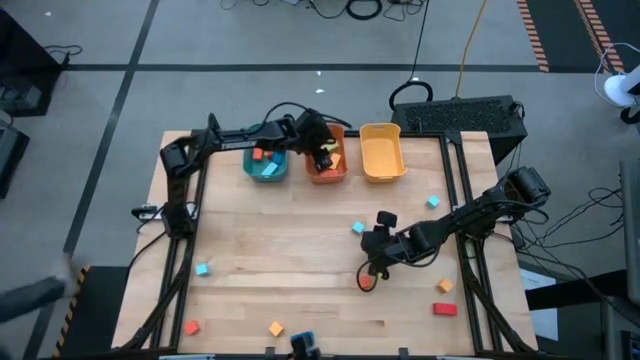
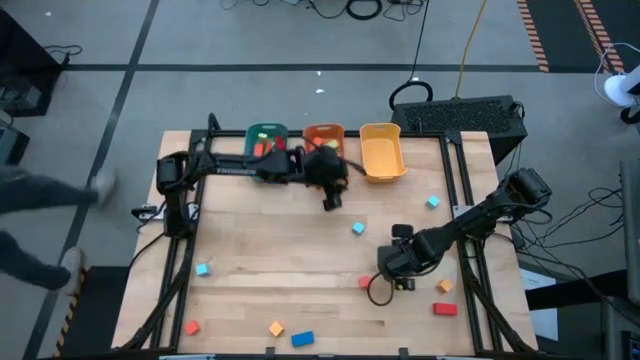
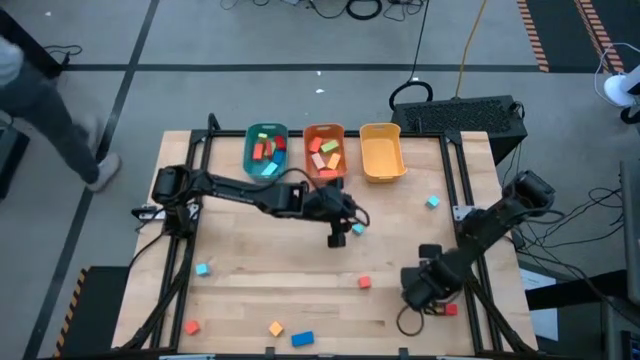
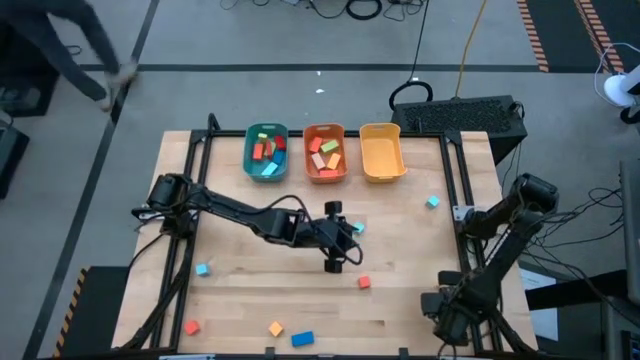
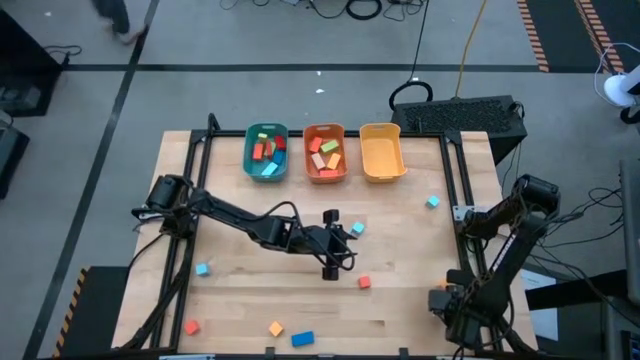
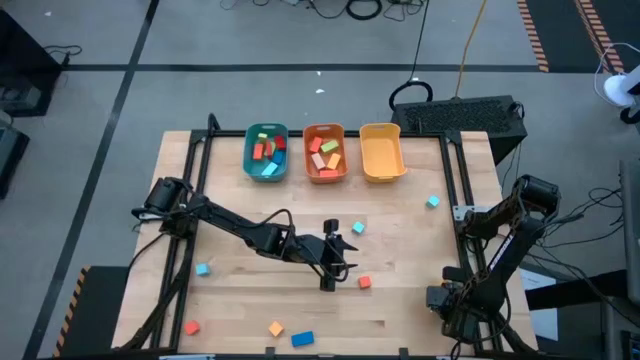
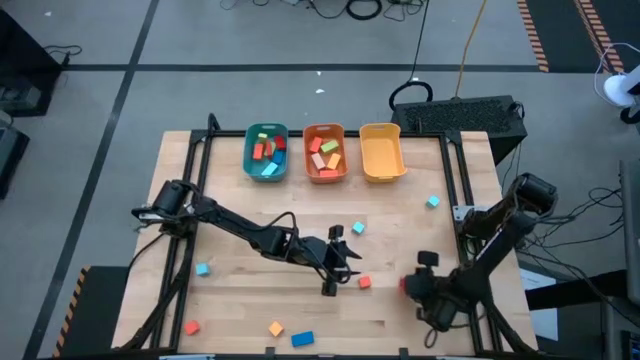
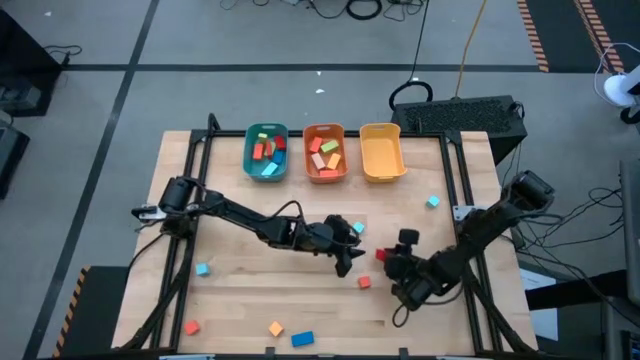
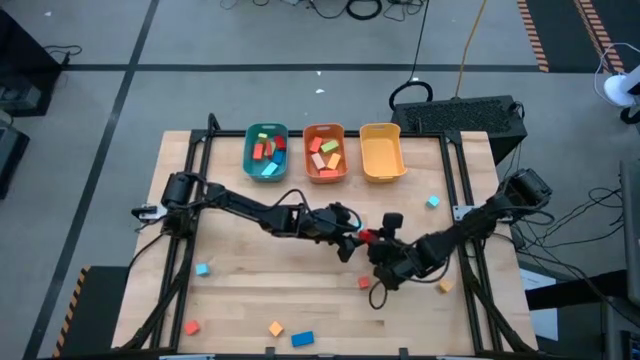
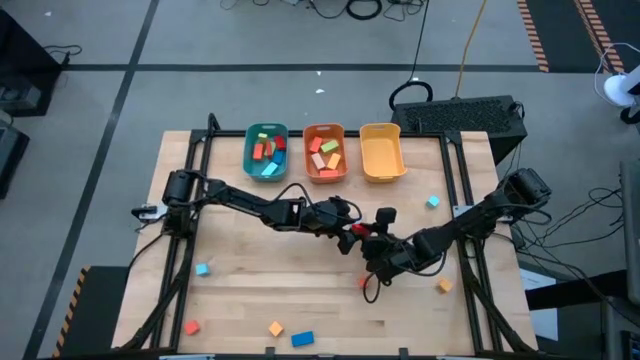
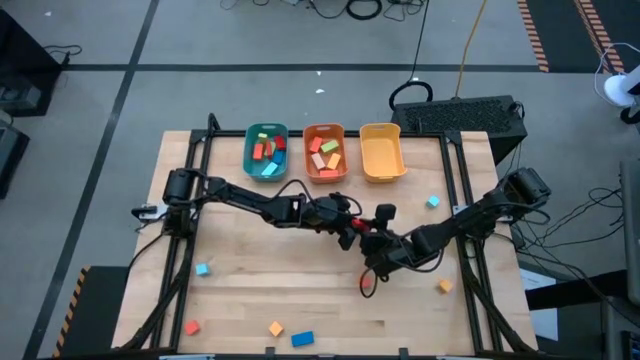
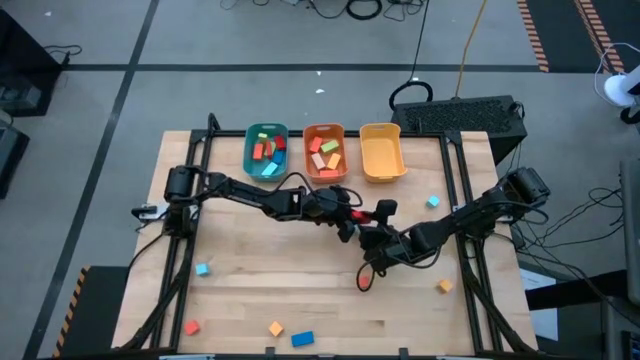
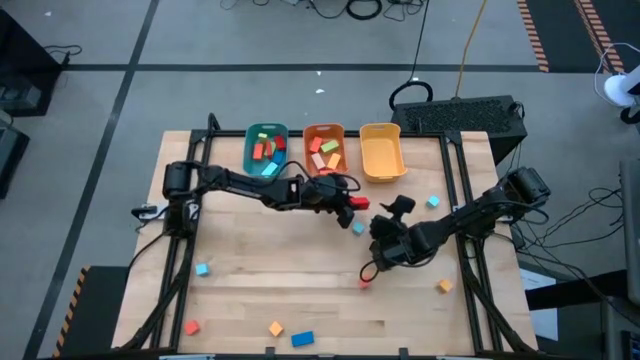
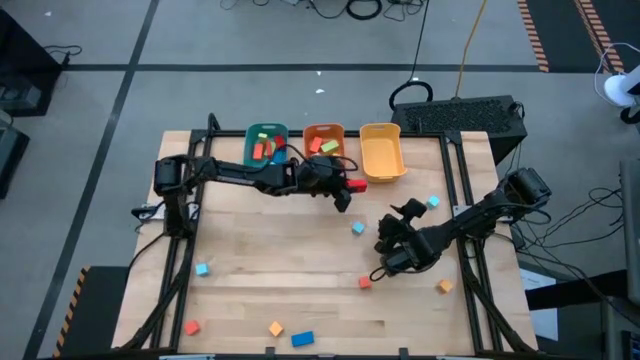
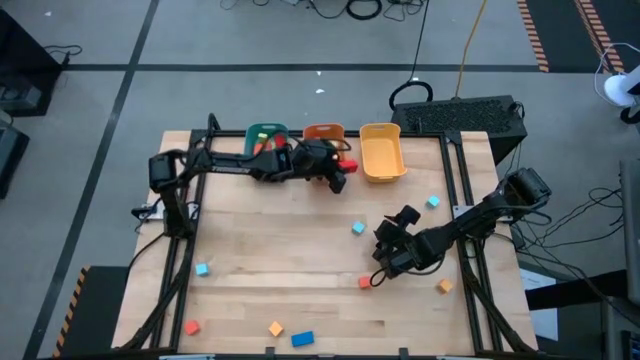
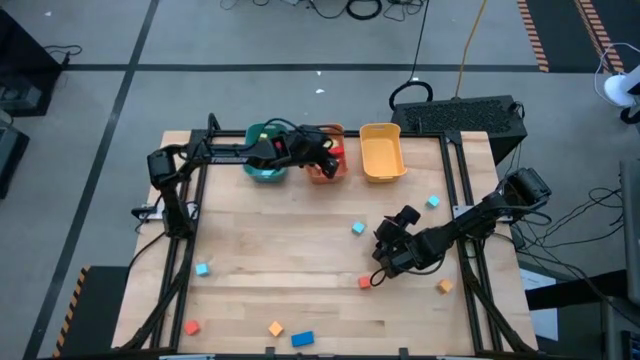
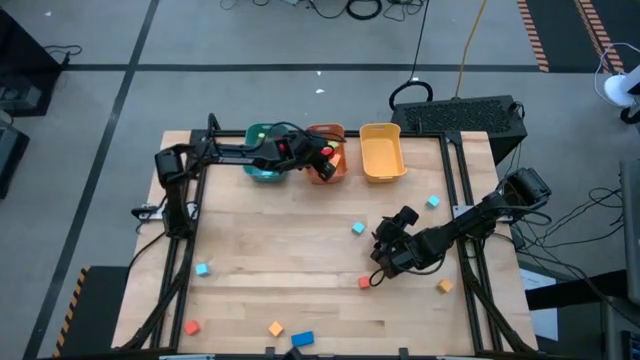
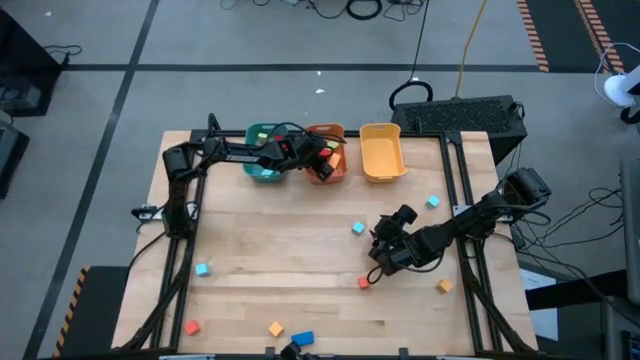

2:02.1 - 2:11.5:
Task: Sort blocks by size
Put the red thick rectangular block into the orange bin

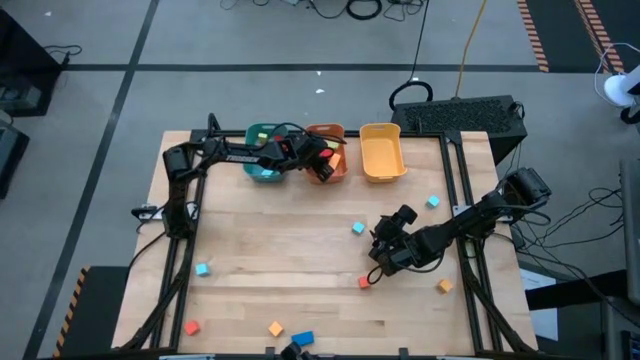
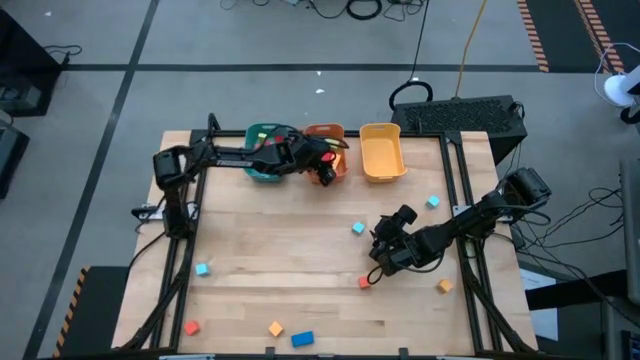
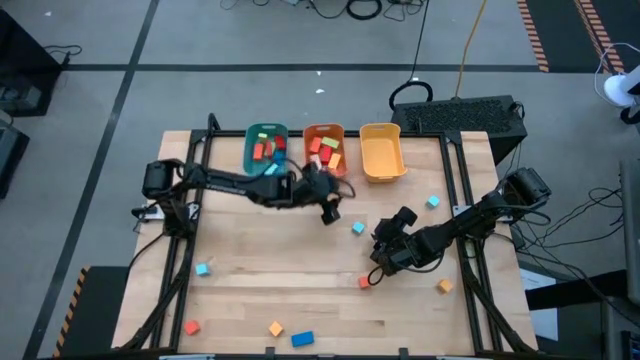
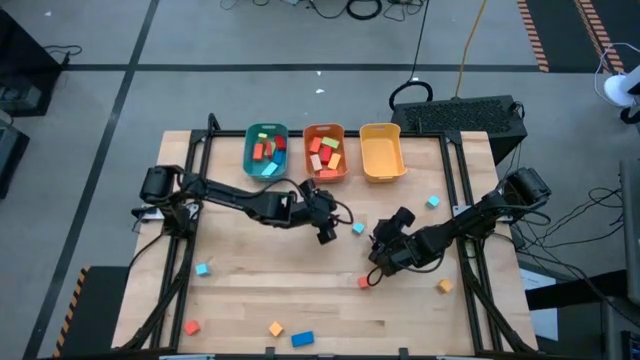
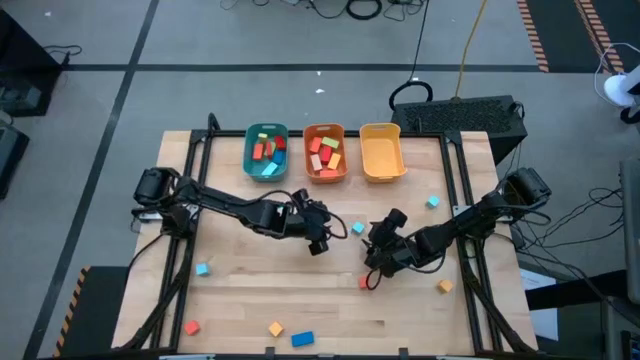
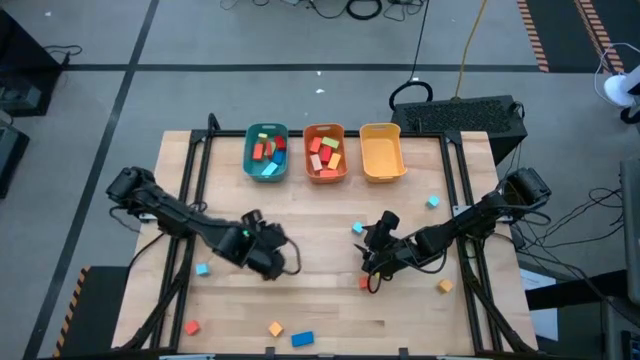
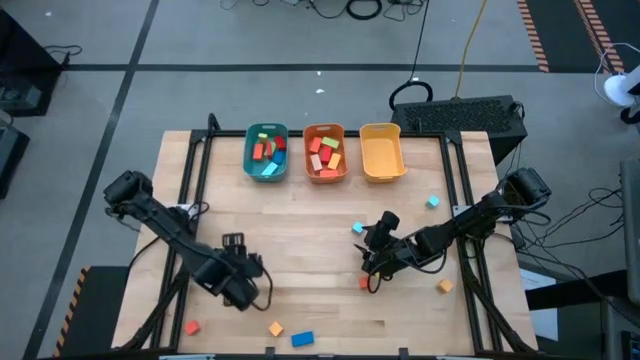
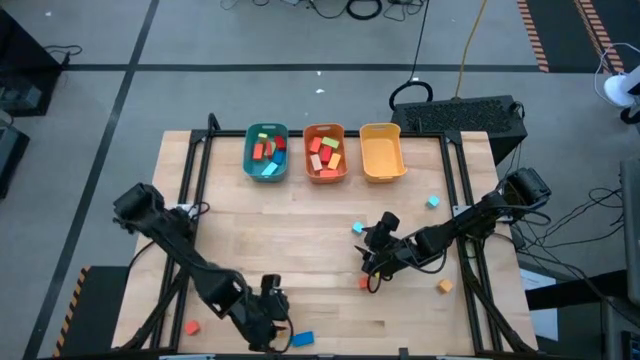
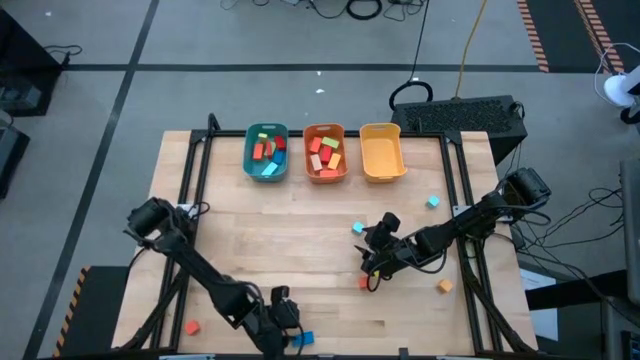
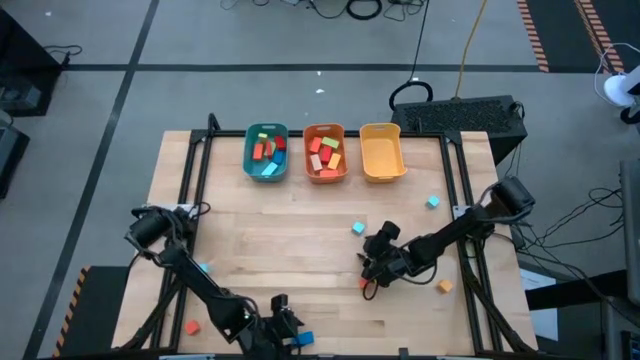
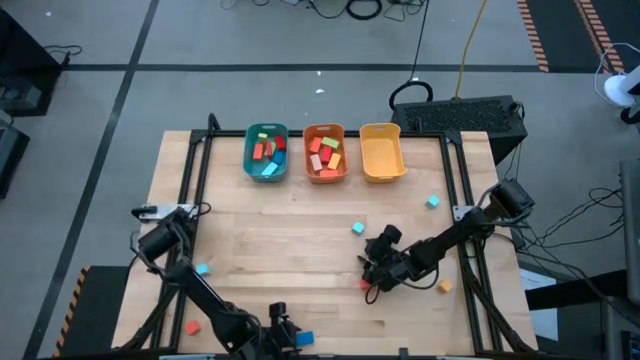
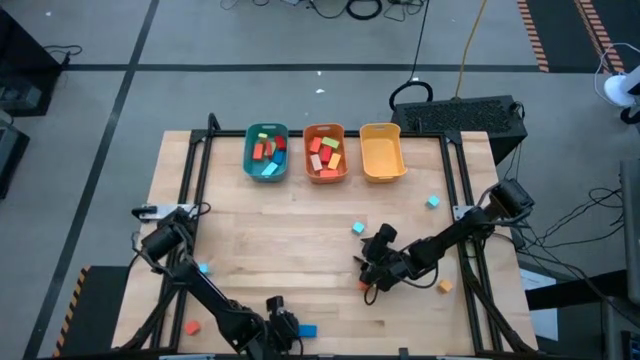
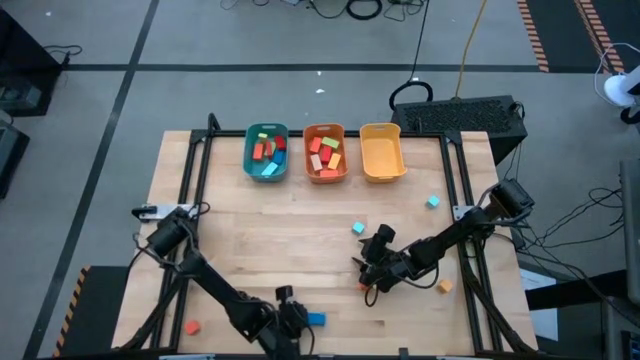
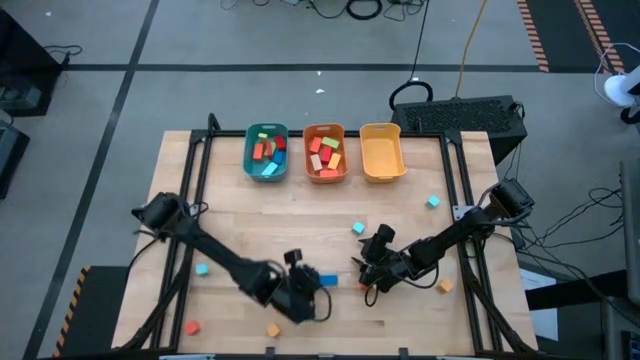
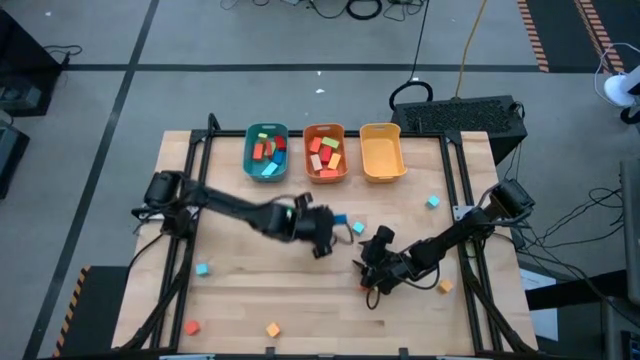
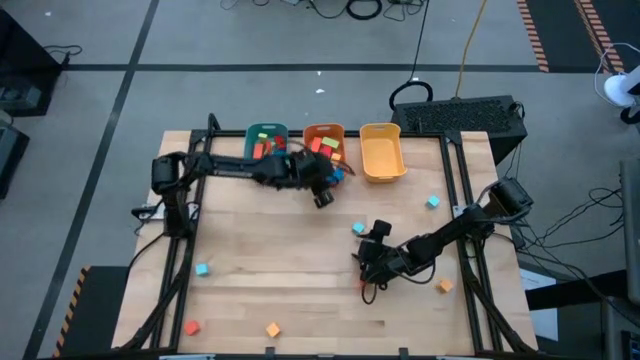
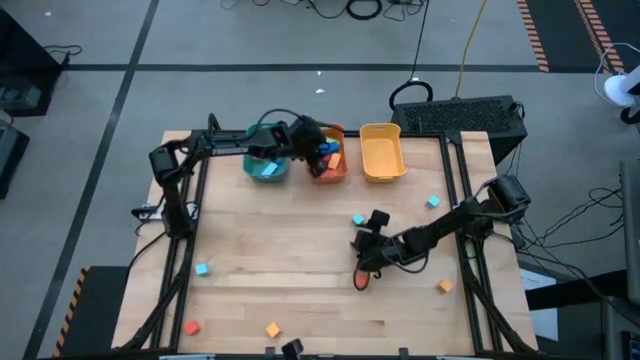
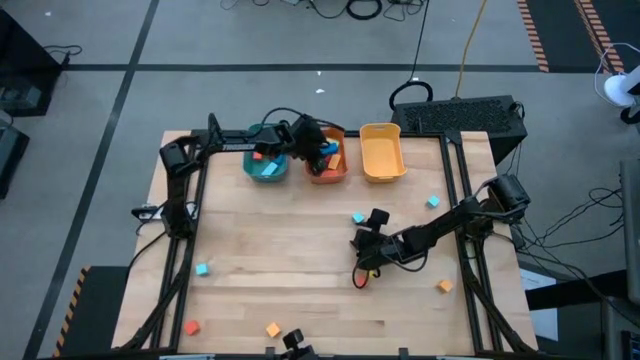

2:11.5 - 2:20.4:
Put the blue thick rectangular block into the orange bin

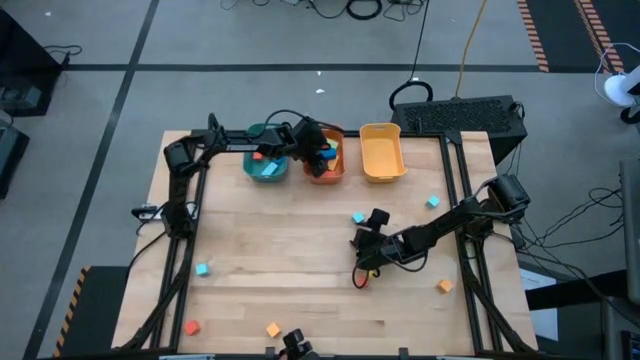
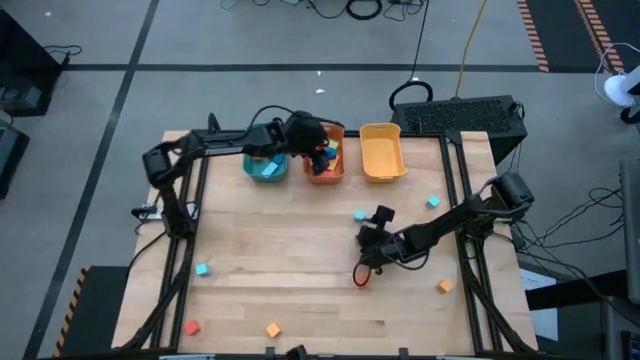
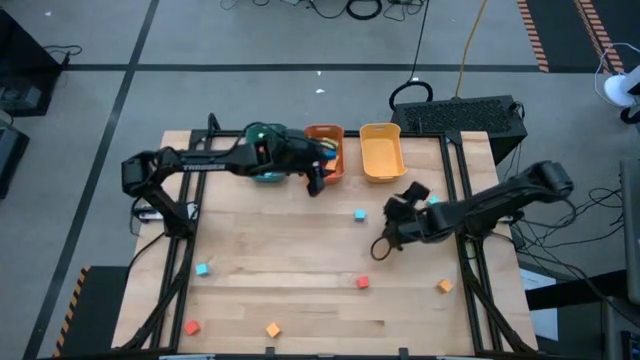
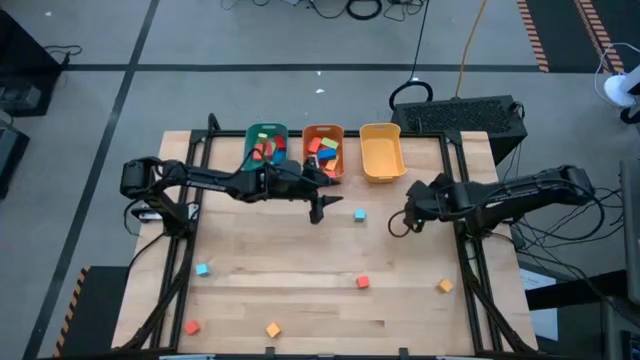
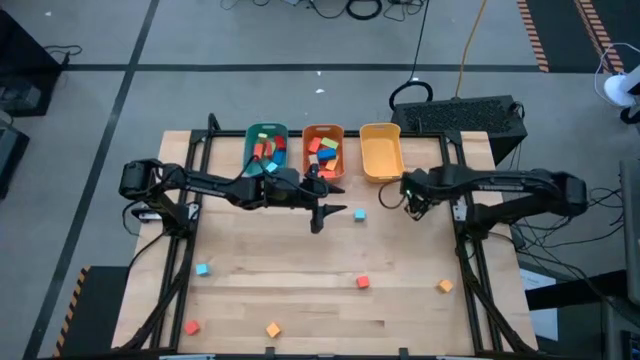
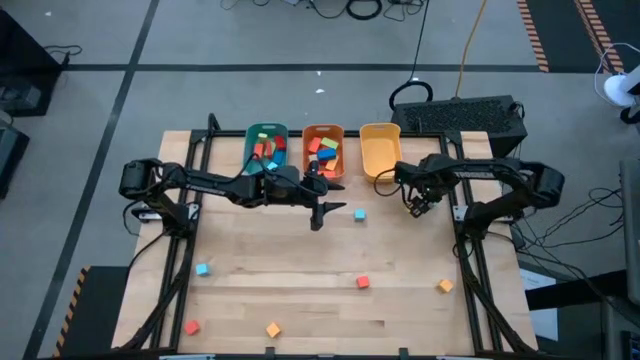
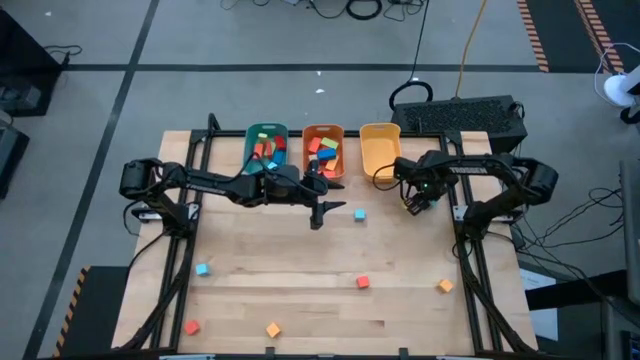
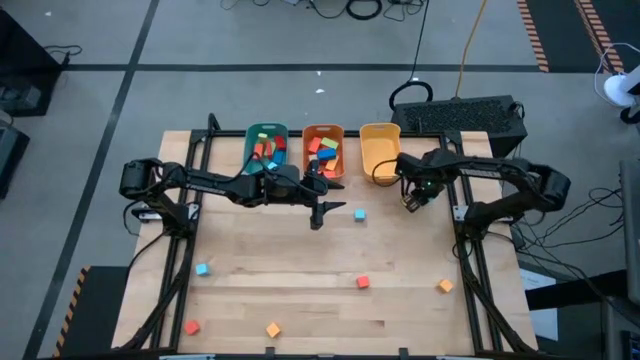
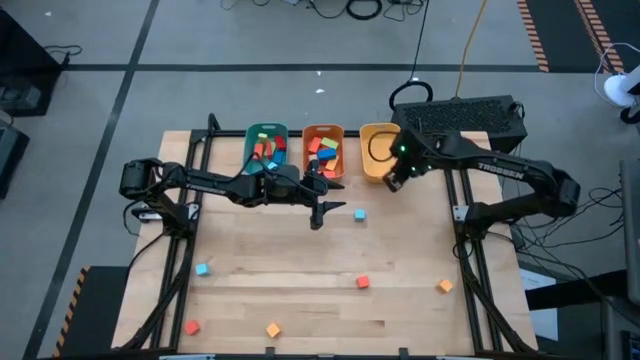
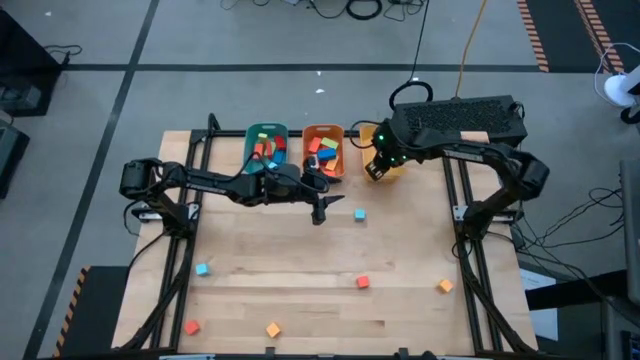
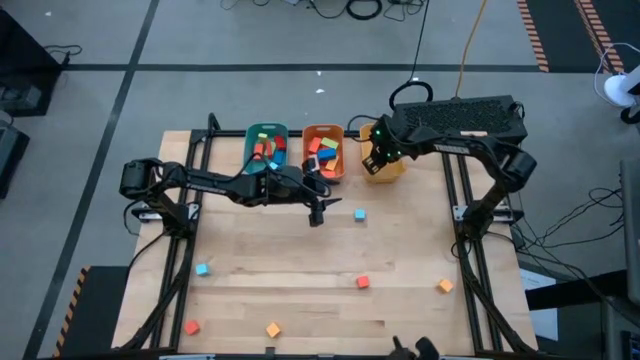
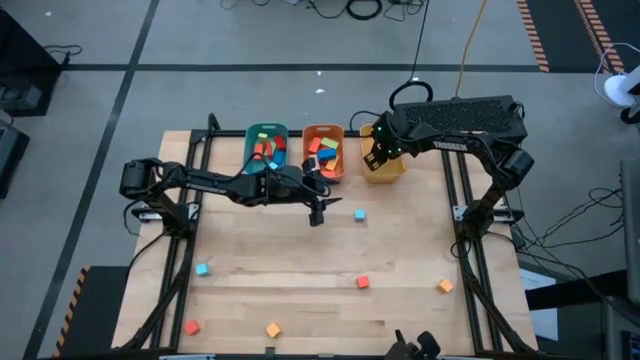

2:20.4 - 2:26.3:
Put the right light blue cube block into the yellow bin
